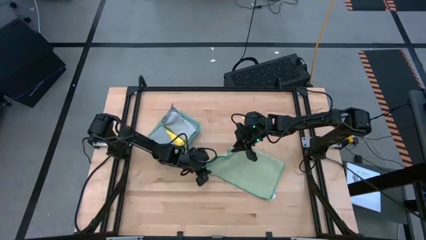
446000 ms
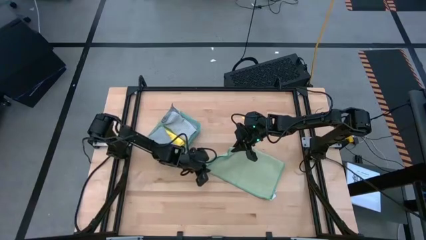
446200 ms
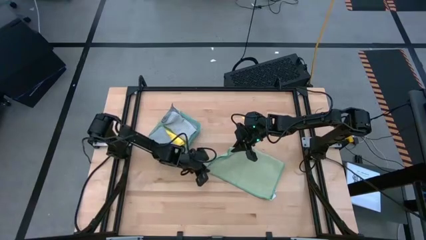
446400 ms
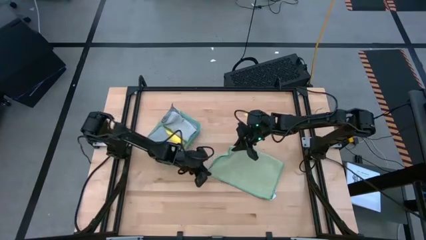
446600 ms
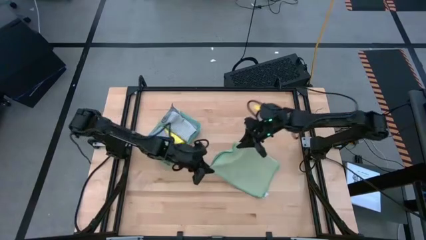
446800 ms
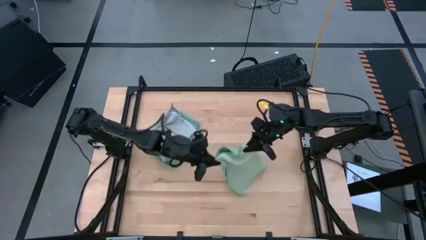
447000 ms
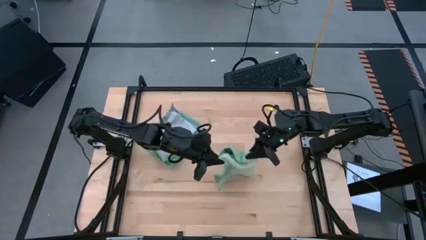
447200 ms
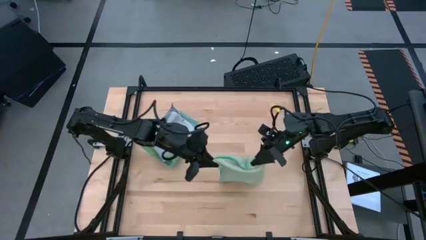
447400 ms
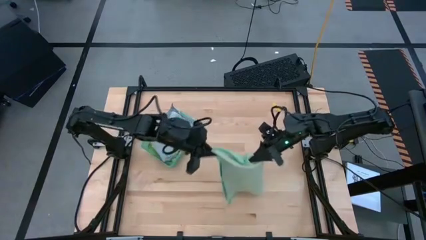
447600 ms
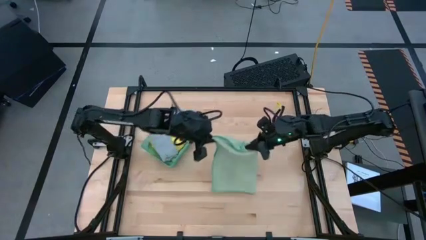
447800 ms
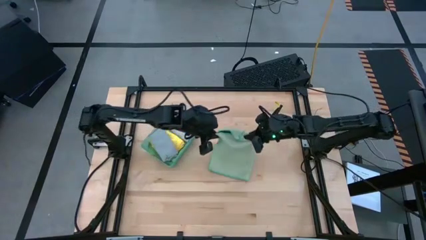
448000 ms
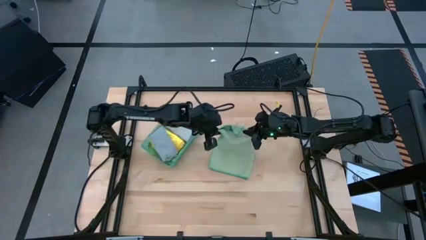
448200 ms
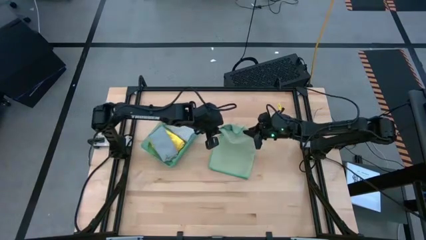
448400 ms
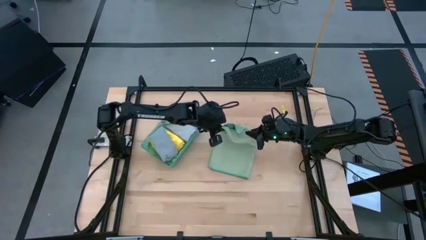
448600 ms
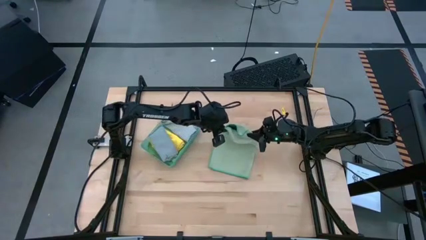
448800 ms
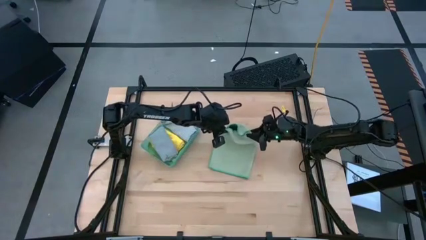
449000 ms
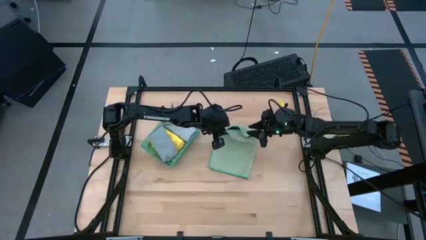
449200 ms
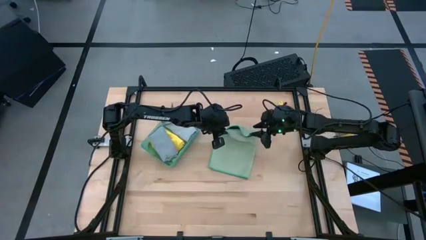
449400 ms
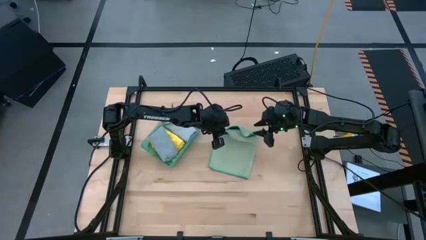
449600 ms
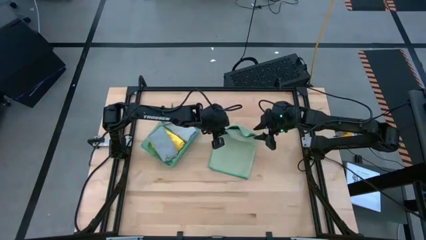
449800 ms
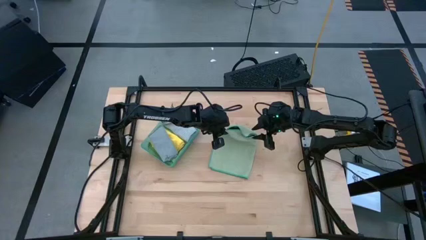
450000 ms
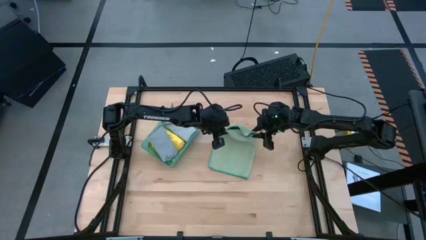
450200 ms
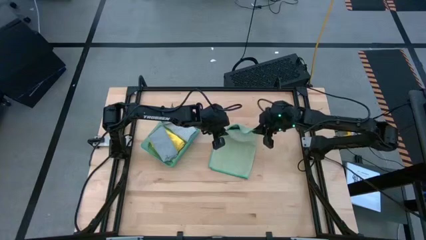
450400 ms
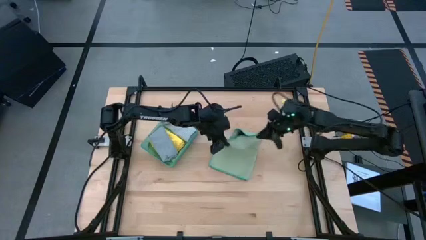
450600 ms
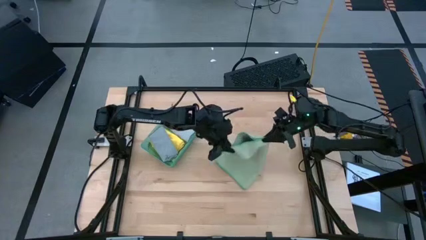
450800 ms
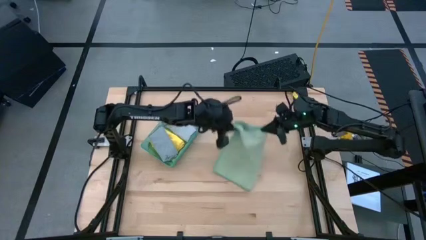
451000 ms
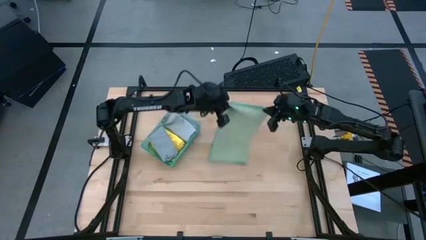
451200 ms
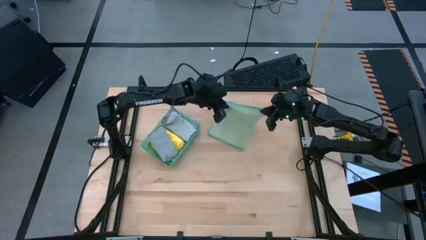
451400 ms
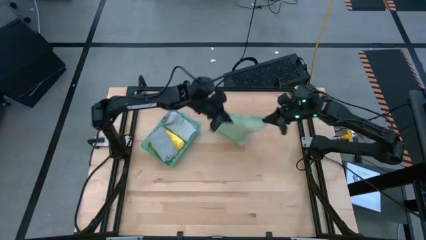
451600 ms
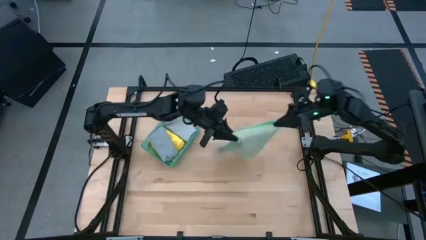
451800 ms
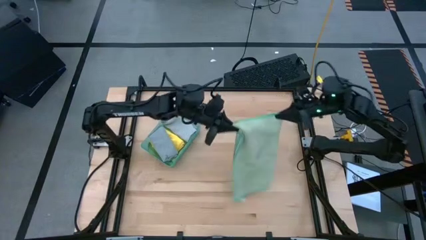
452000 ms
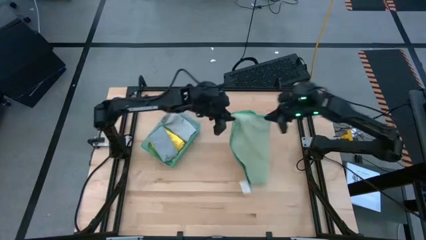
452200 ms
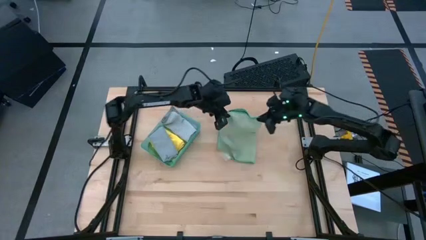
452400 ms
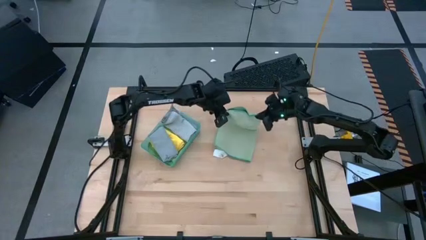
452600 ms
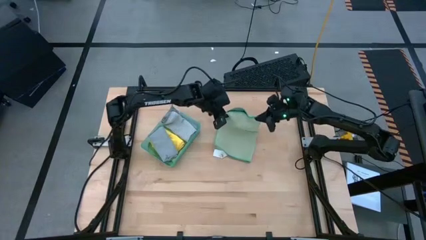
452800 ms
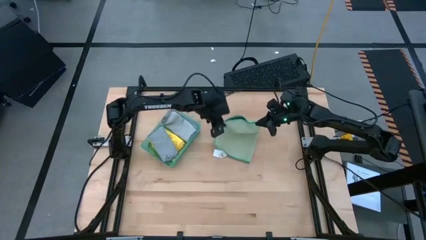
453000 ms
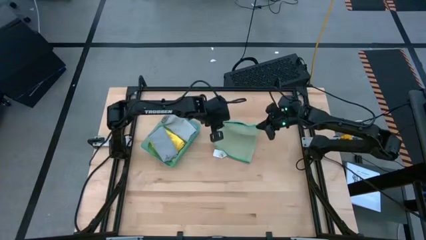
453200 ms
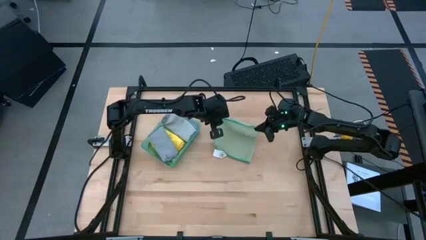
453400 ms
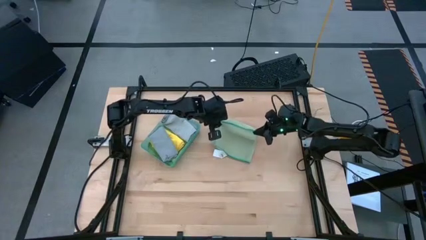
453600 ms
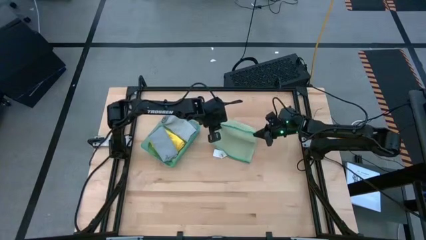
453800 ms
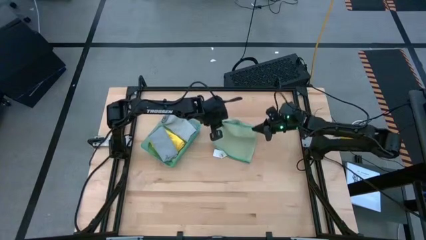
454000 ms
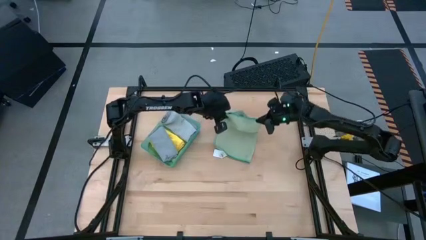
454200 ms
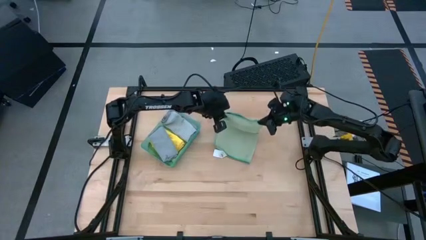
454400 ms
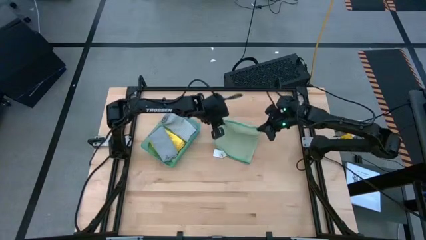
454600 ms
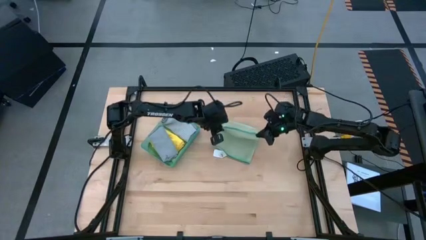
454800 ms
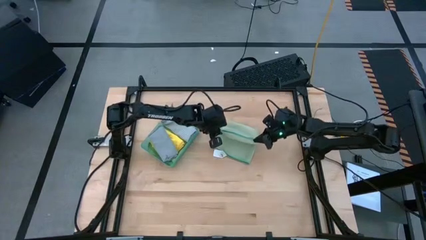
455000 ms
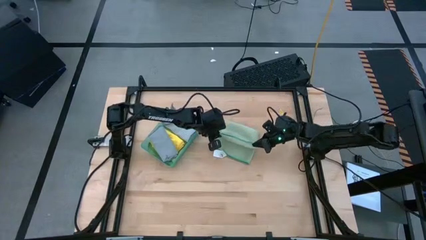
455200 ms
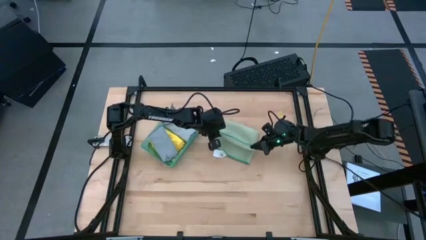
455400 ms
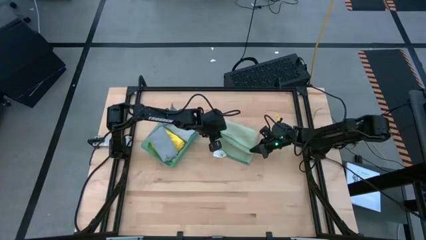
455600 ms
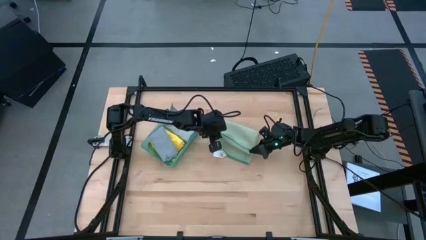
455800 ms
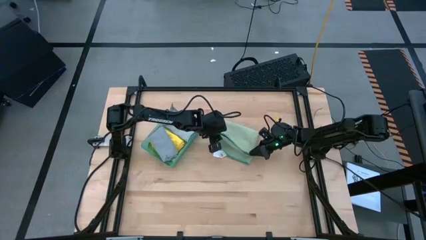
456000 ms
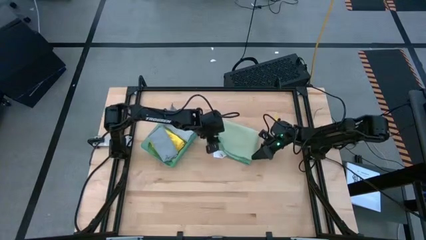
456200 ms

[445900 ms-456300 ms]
Task: Fold microfiber towels
Fold the light green microfiber cloth

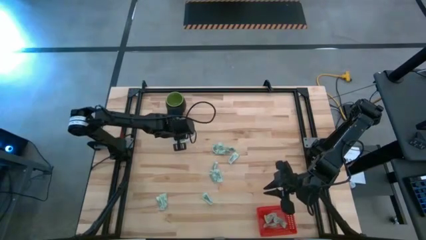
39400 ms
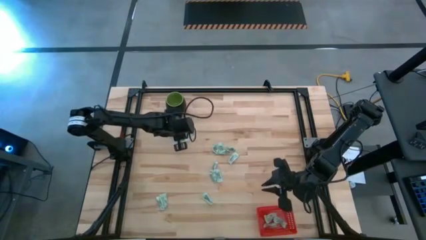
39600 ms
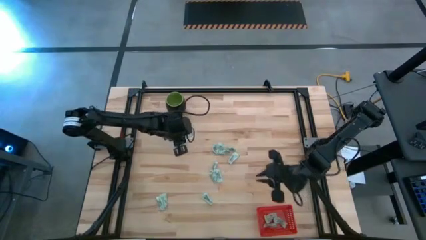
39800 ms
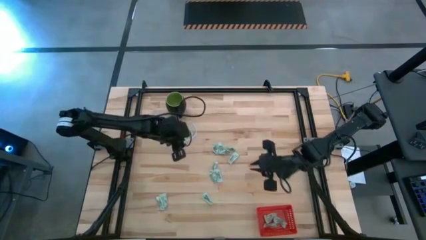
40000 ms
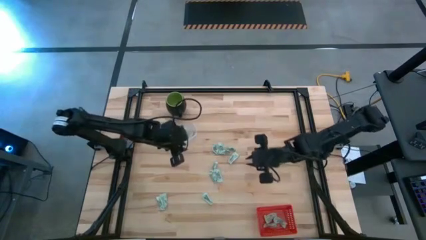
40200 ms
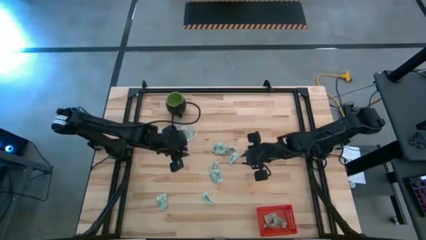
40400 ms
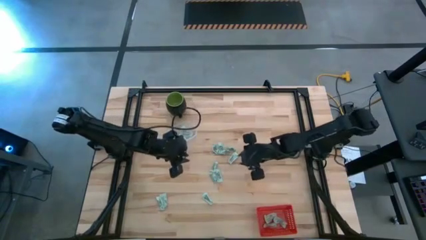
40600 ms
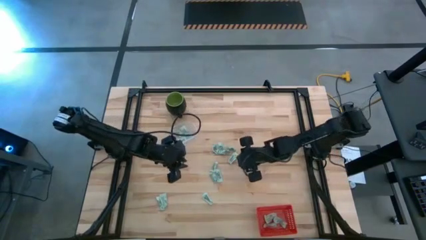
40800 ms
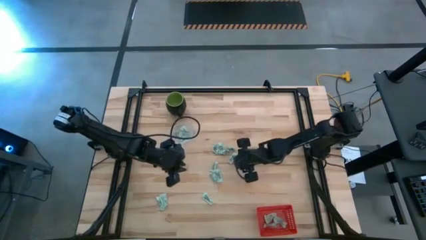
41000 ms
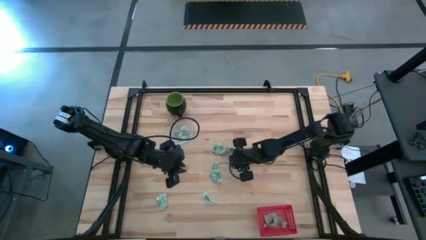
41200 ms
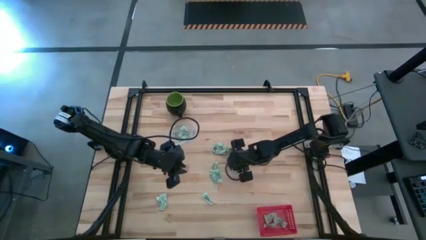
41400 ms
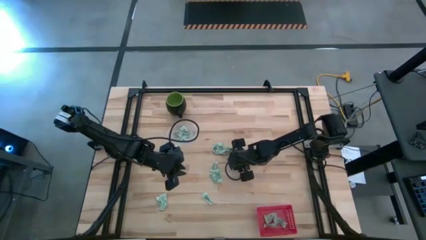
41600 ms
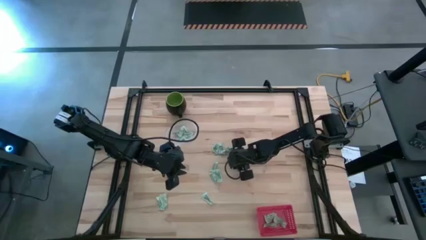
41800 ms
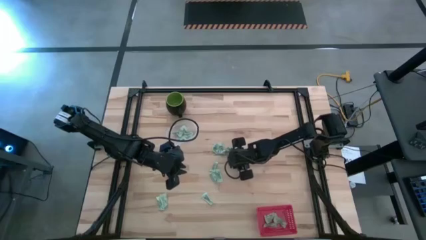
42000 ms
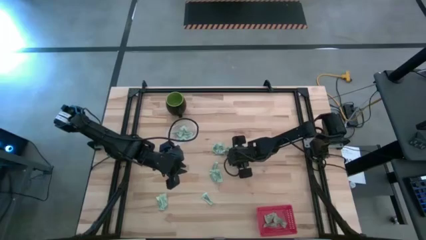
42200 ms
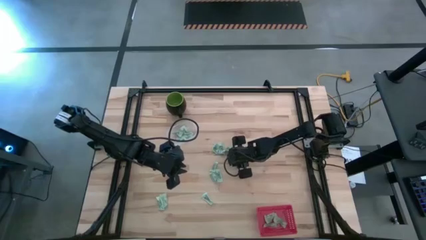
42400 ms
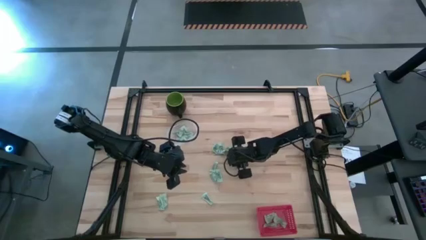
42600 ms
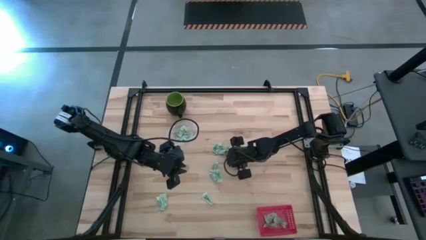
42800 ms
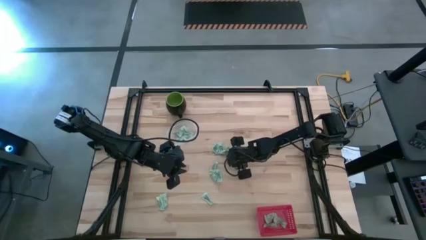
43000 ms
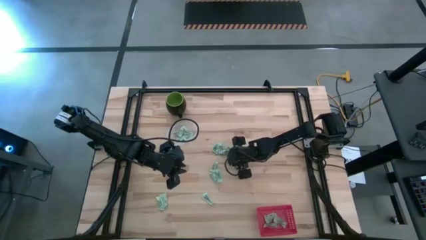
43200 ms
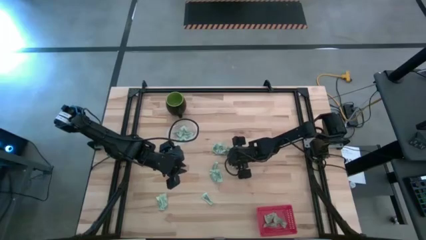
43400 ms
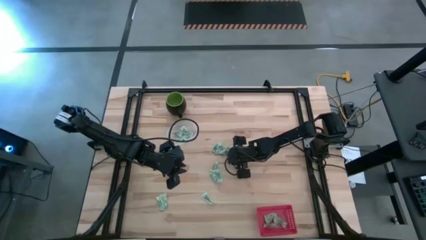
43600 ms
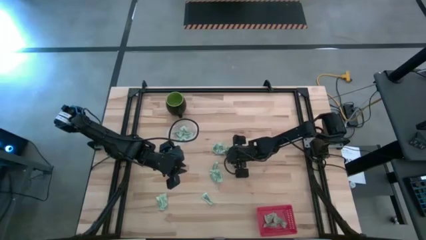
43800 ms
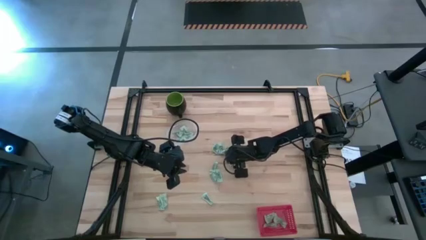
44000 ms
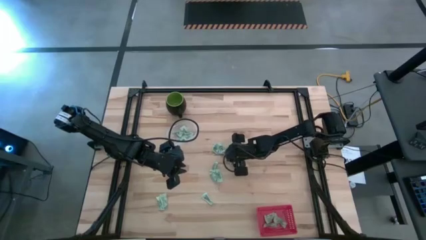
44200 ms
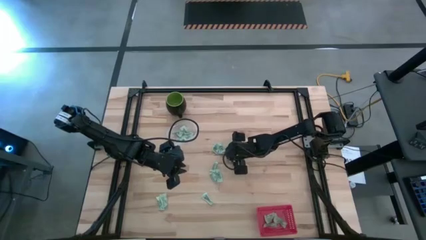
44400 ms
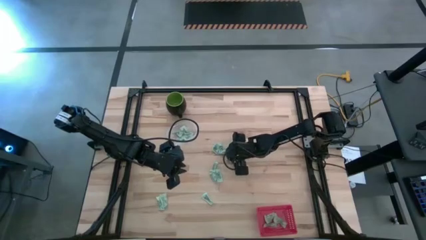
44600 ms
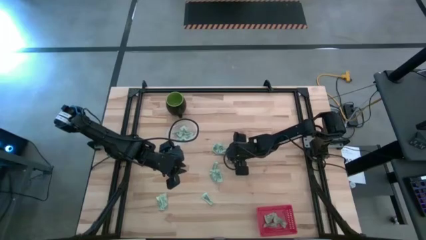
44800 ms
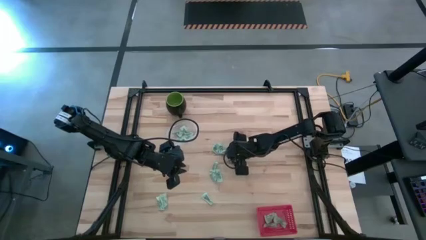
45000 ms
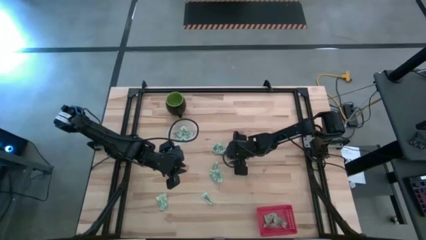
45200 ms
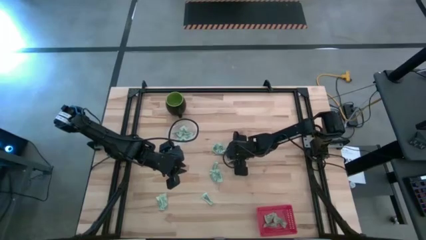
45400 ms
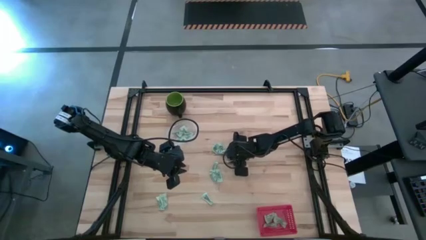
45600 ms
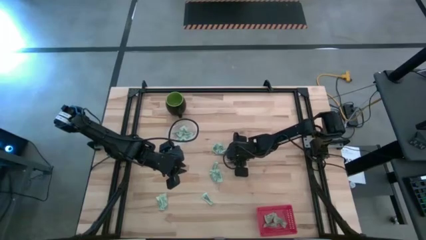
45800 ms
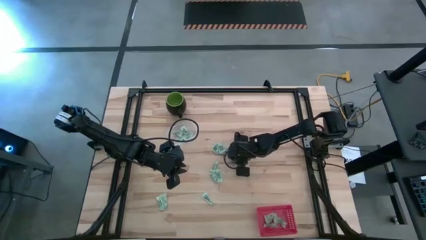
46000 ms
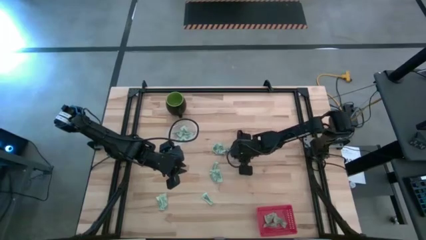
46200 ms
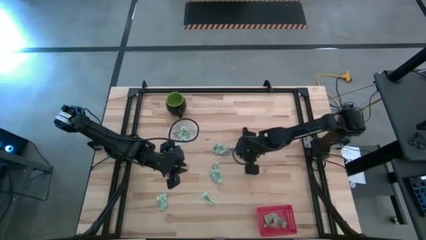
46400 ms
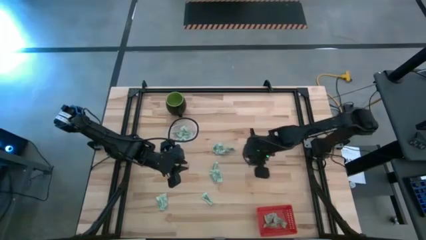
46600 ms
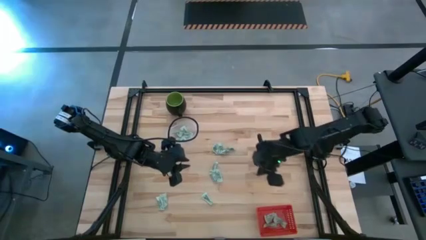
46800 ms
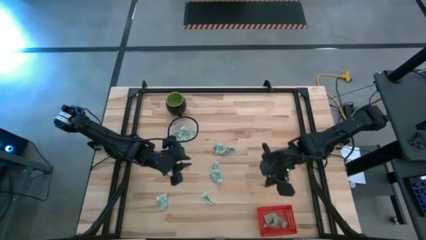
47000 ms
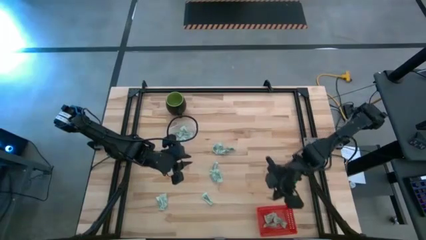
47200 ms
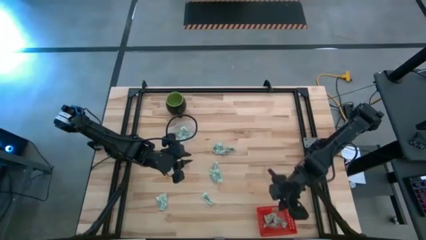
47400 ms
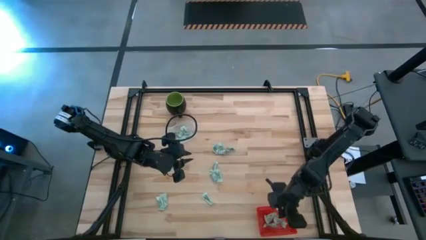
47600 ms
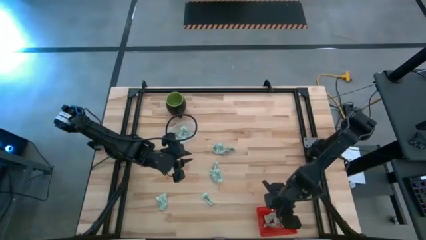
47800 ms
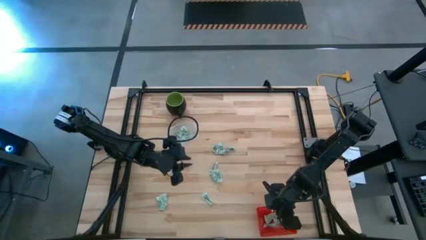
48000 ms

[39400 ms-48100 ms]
Task: Pick and place items into bin
Put the green stevia packet into the red basket
